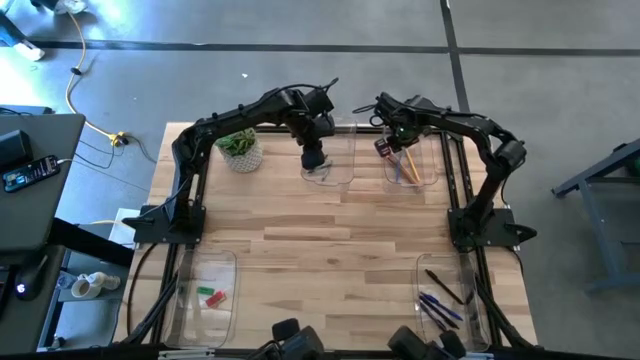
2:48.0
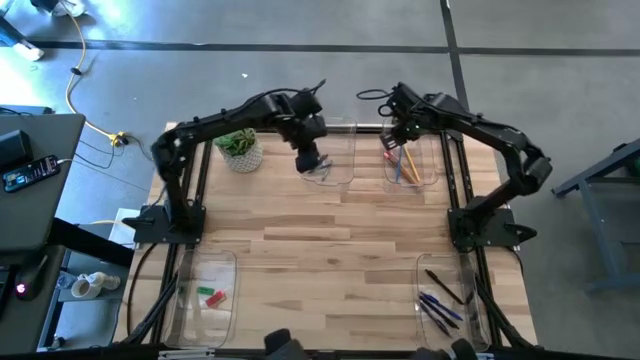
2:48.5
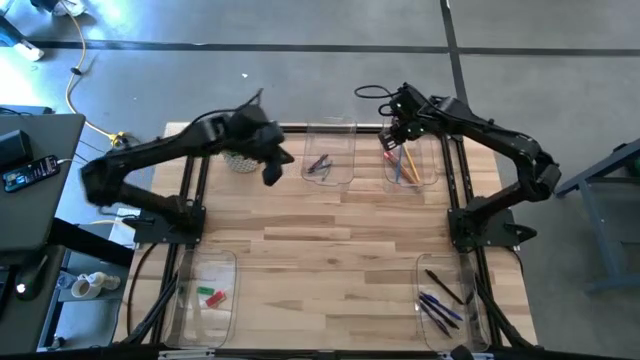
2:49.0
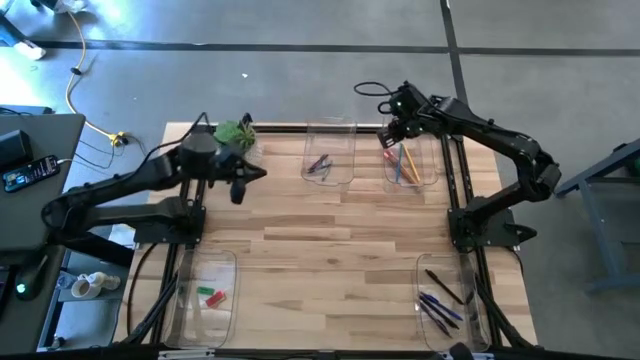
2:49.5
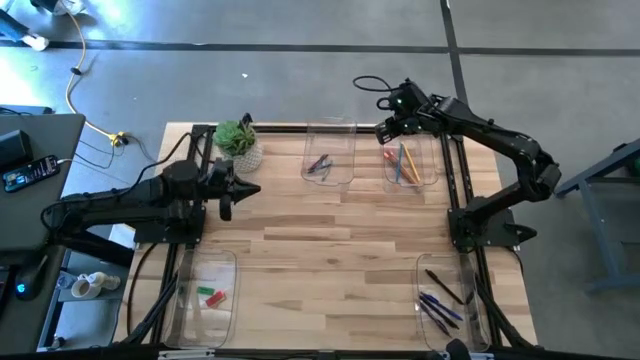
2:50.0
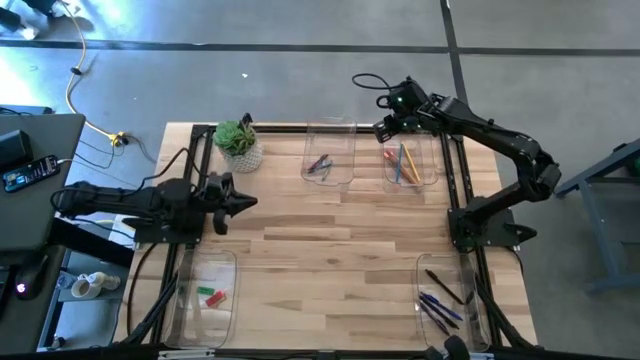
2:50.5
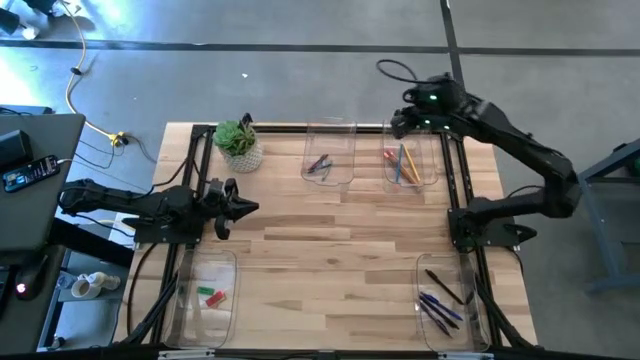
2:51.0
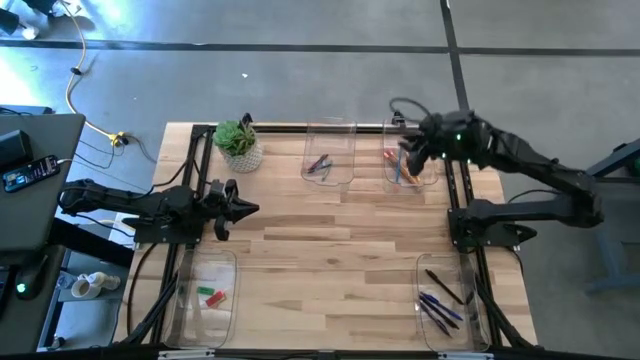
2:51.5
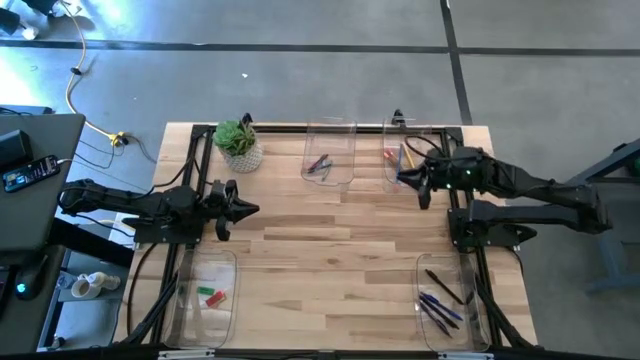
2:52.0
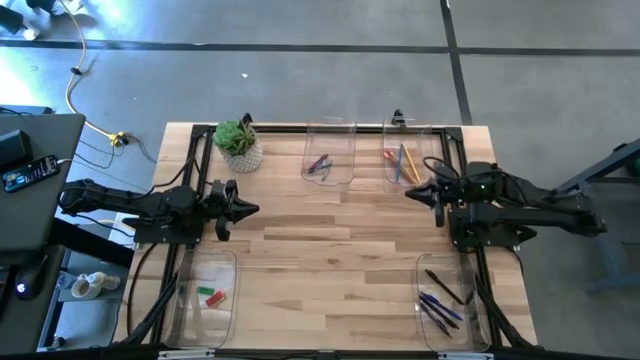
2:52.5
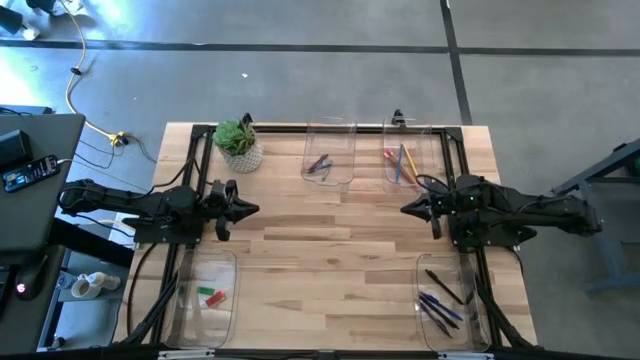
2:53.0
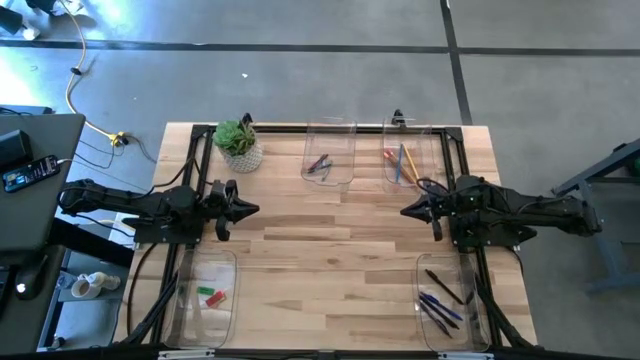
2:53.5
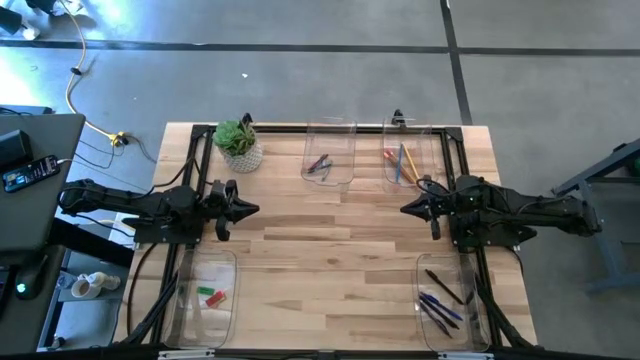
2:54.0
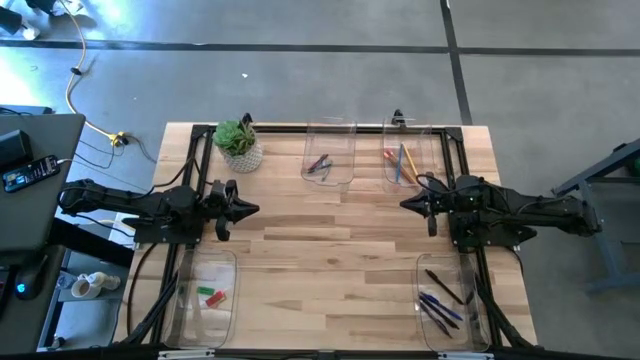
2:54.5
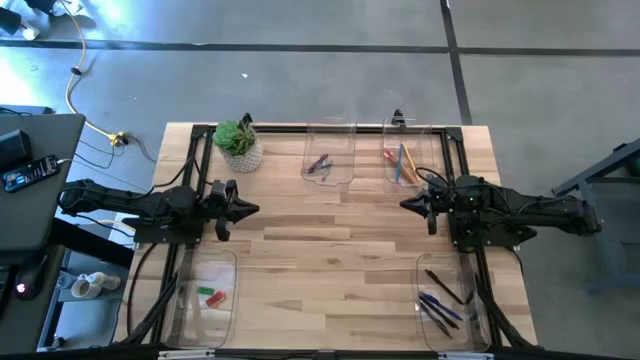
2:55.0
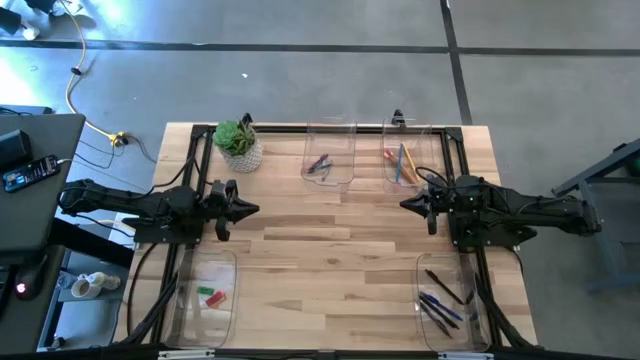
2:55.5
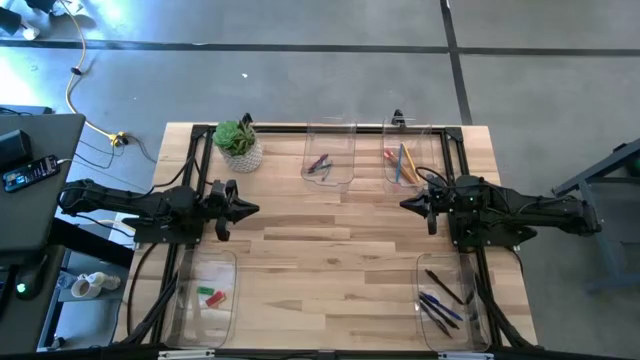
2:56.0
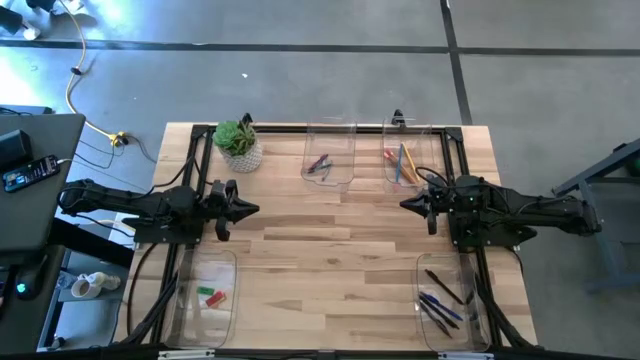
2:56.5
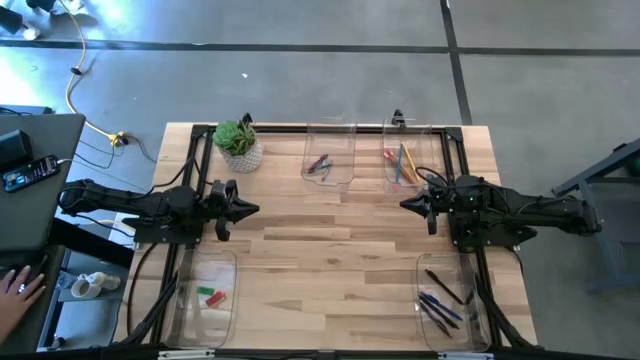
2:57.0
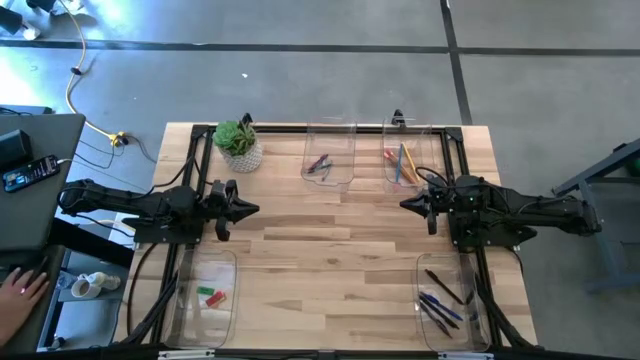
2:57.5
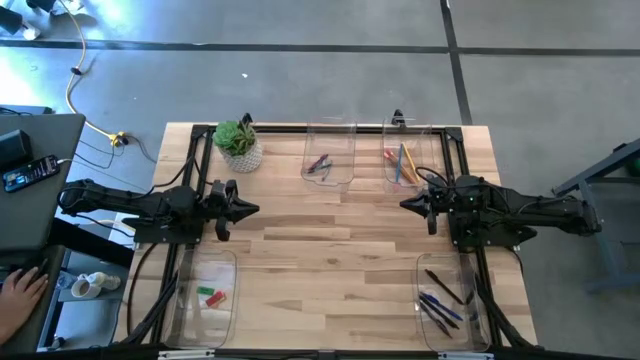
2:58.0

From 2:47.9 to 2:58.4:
Task: Sort crayons/erasers/pens/pencils in bins
Return to Home Position

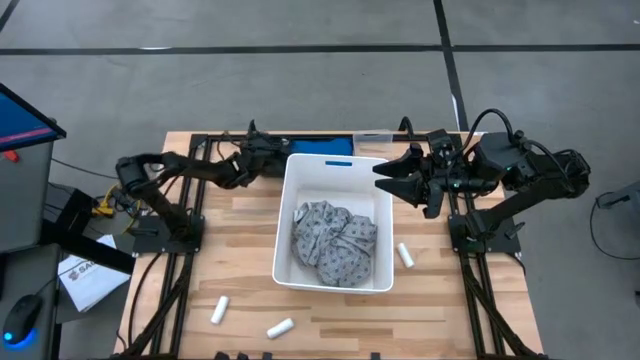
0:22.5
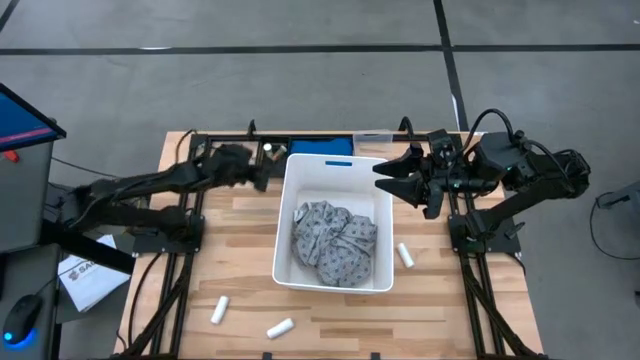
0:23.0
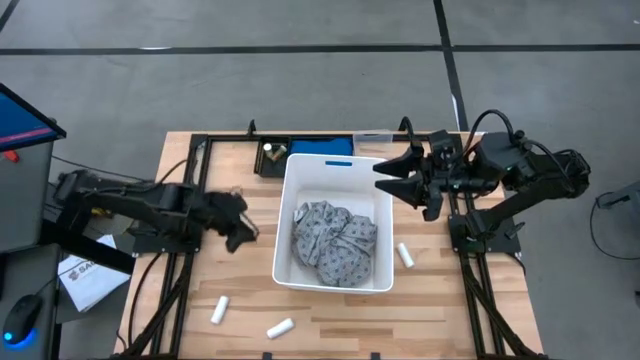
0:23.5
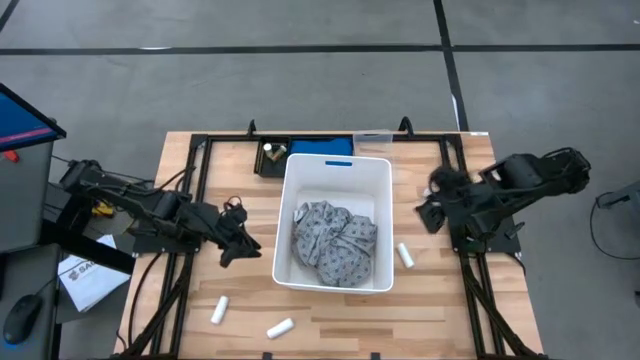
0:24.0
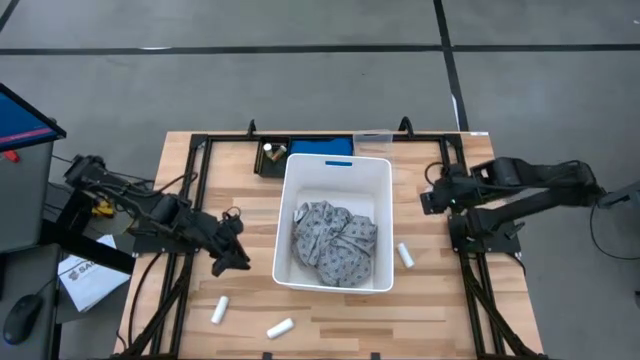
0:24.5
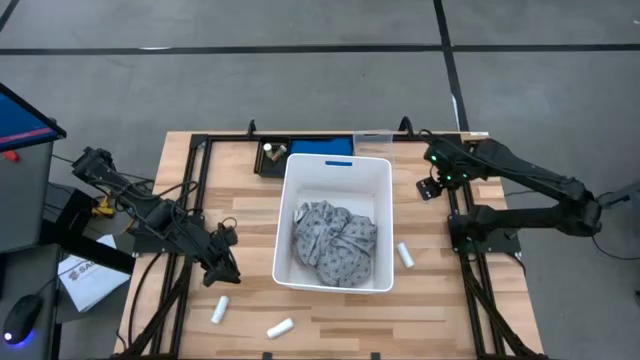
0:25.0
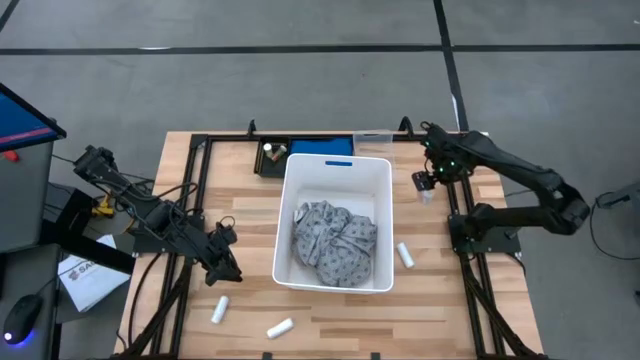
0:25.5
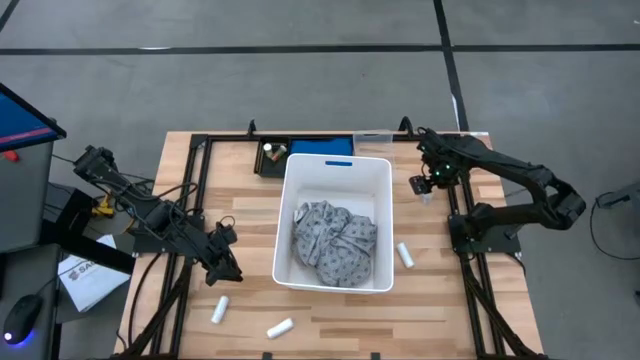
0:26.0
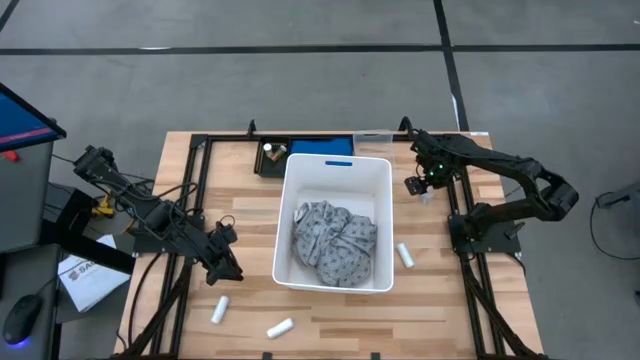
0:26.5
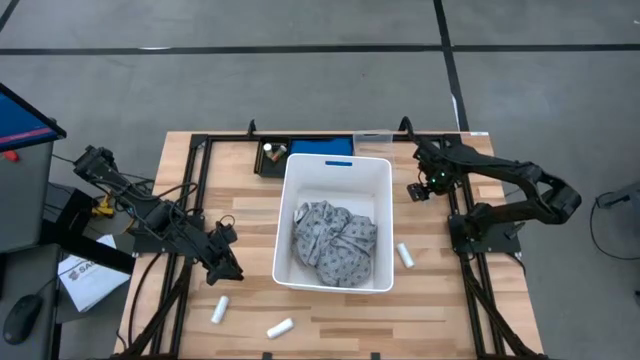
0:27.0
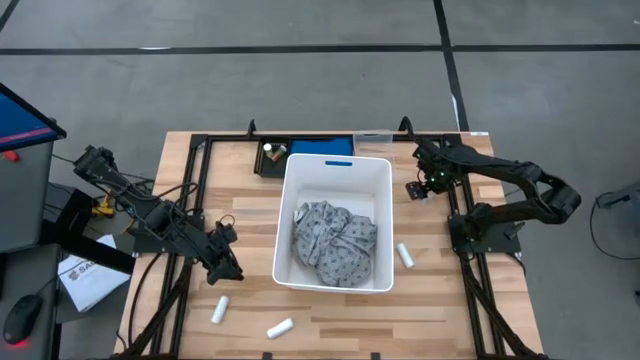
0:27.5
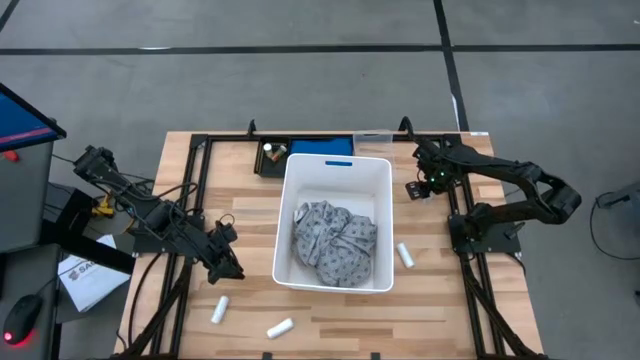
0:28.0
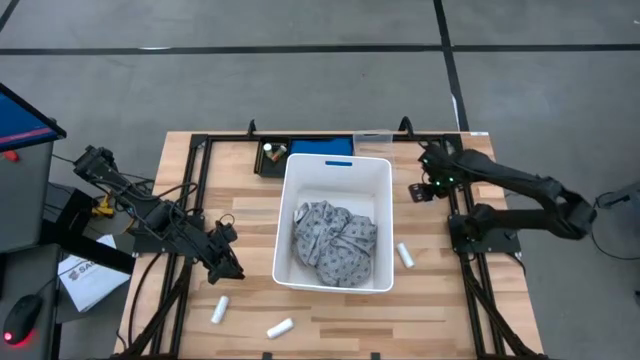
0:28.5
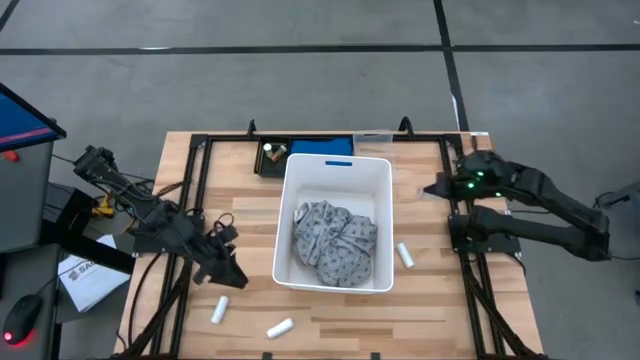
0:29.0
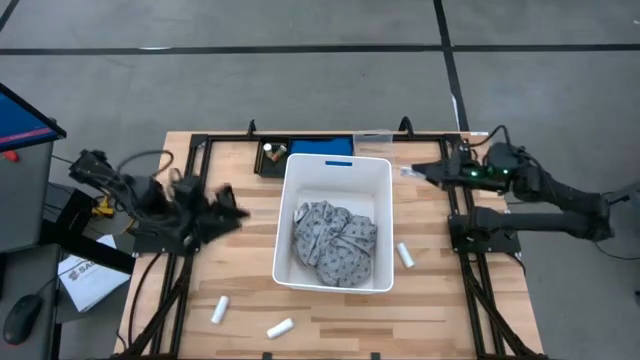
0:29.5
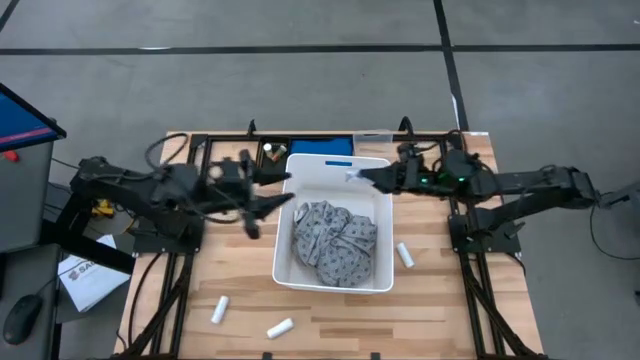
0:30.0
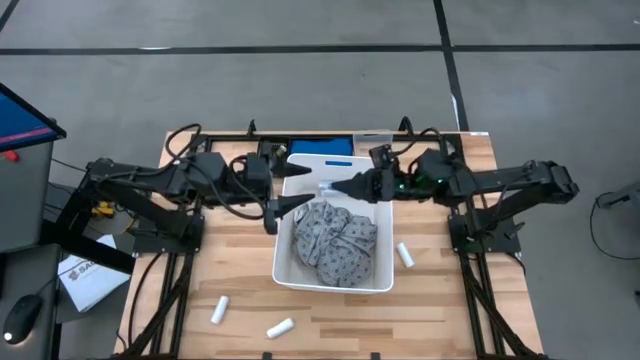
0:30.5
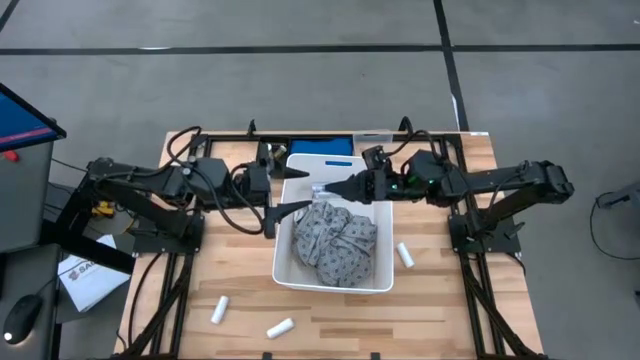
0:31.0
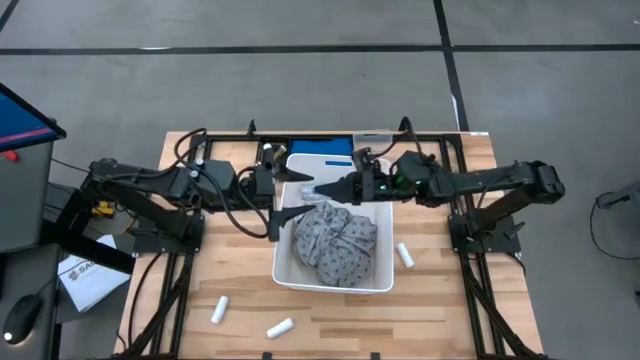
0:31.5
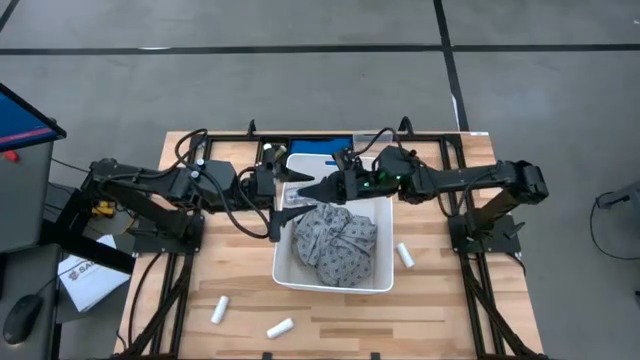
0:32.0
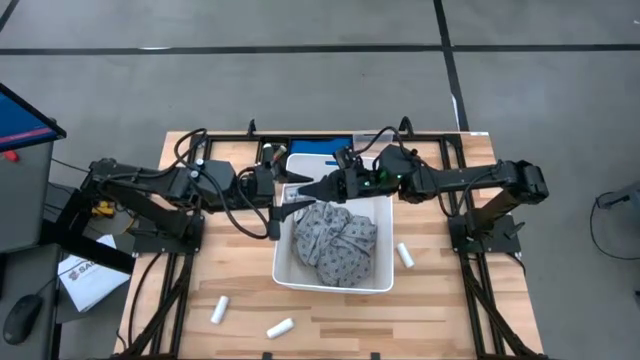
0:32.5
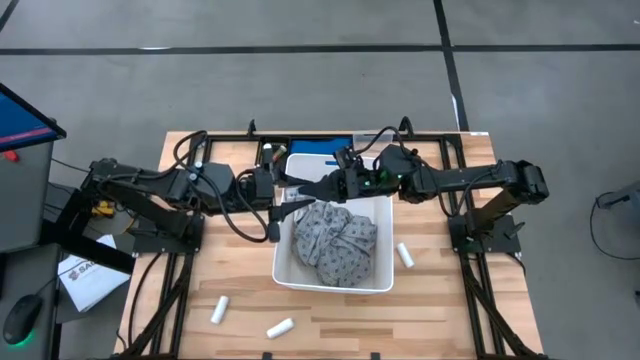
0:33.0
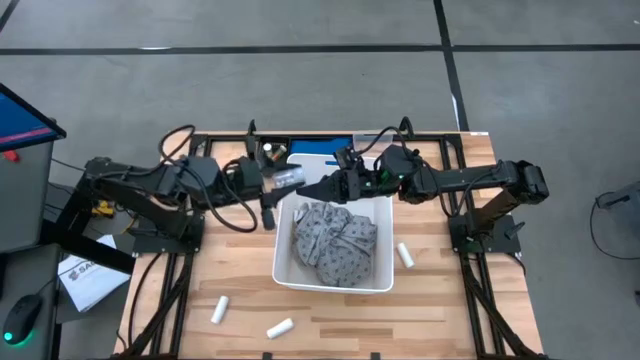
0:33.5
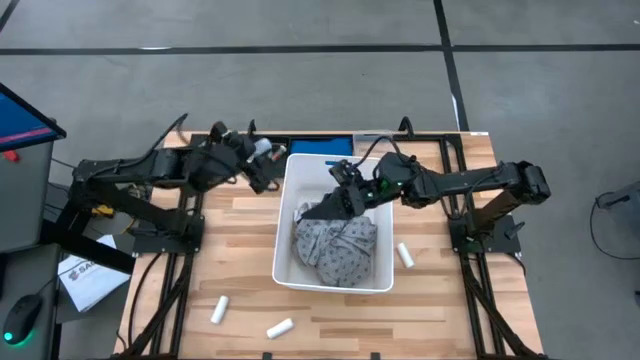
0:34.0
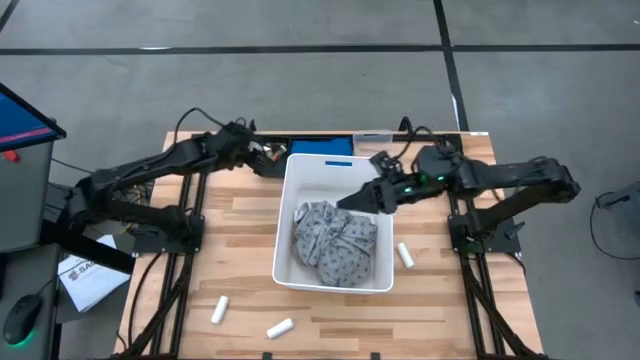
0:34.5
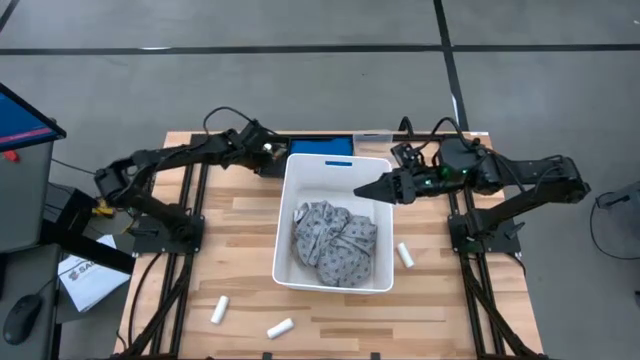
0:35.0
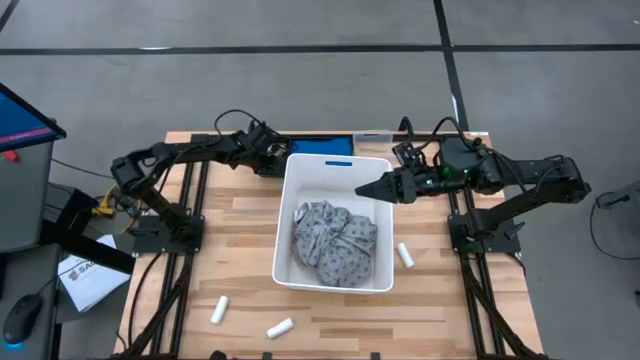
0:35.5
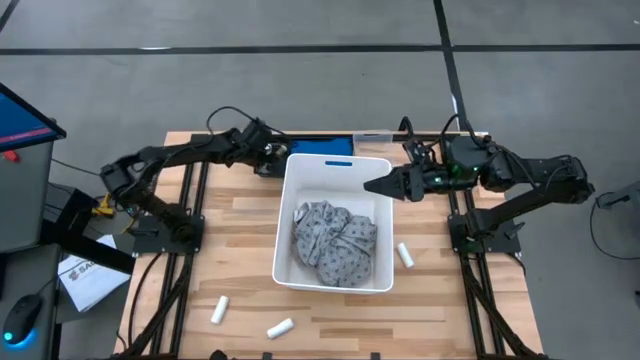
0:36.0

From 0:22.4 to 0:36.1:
Task: Pick & place medical supplies in basket/bin
Put the transparent pin bottle into the left black bin
